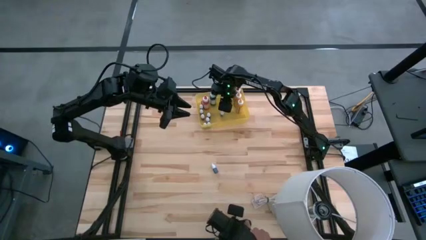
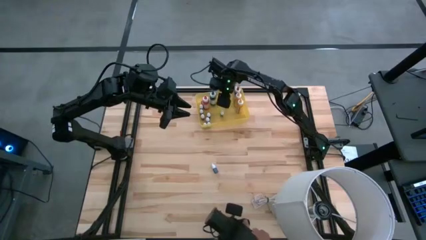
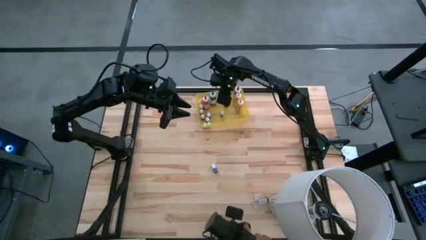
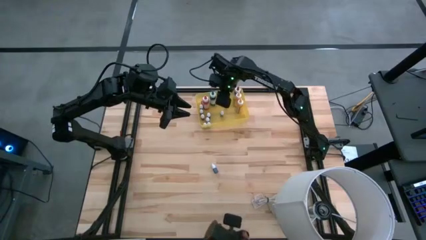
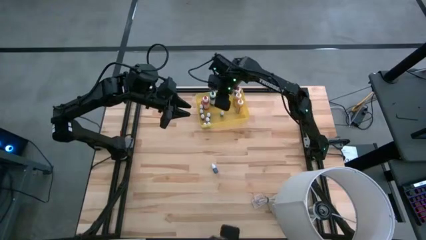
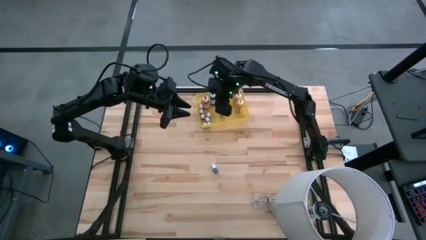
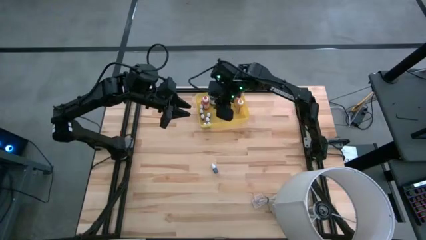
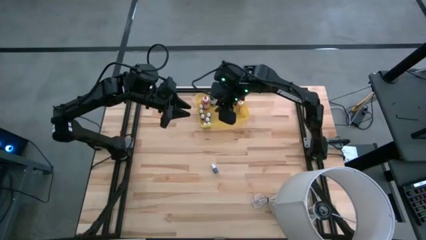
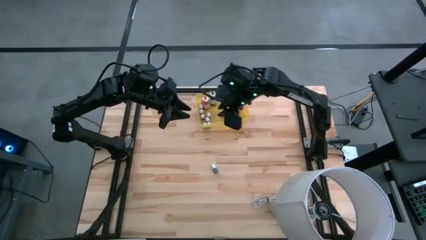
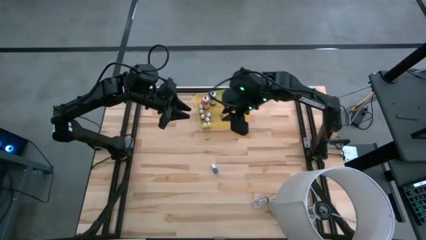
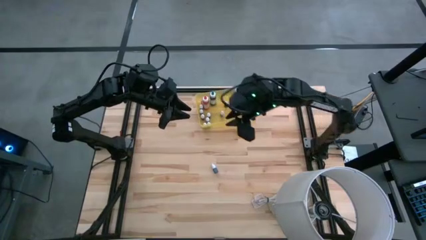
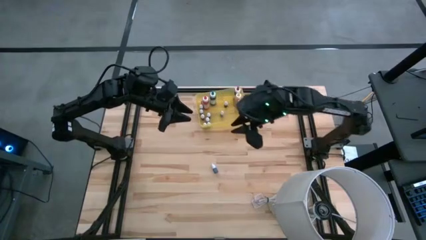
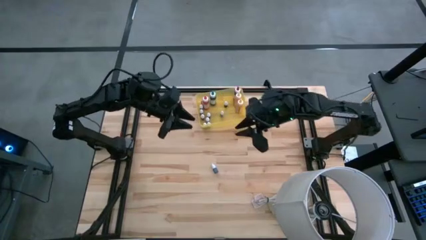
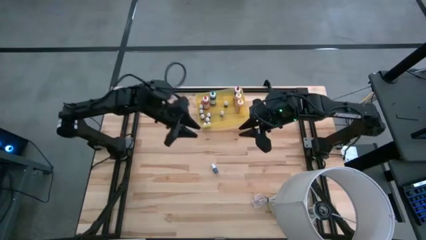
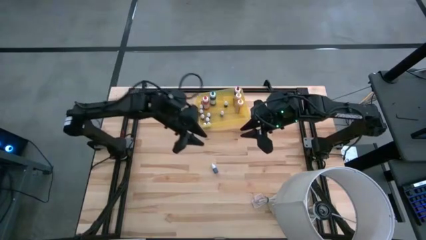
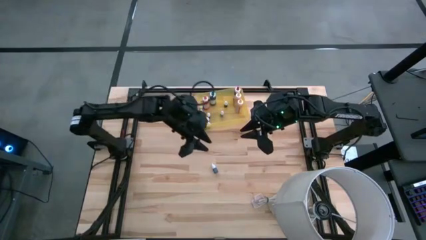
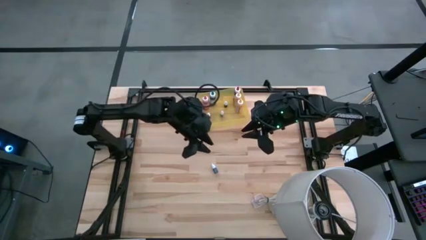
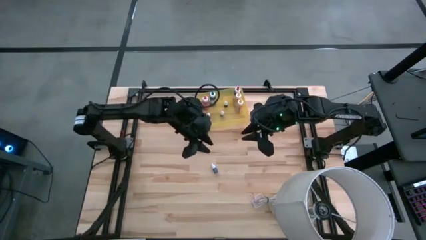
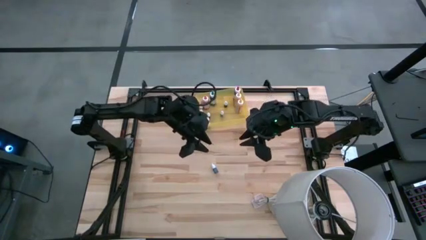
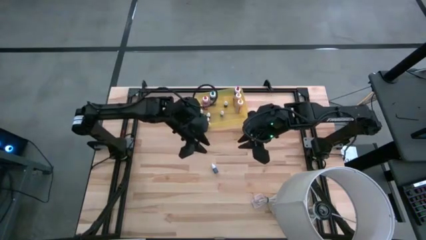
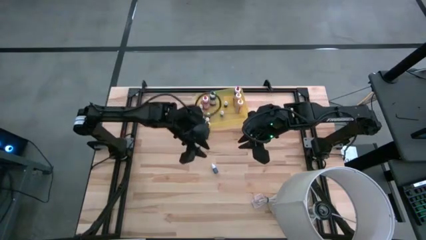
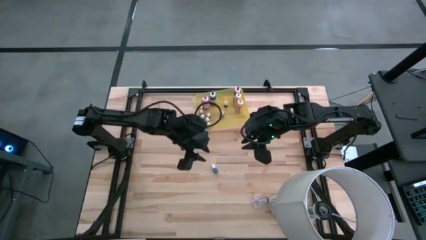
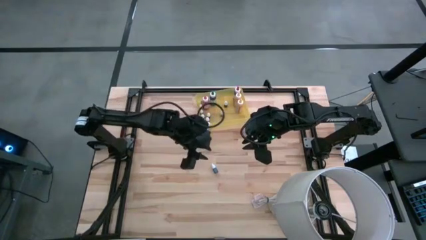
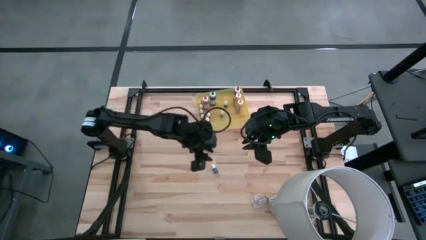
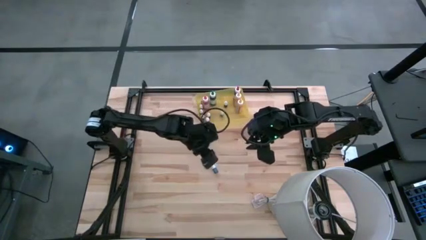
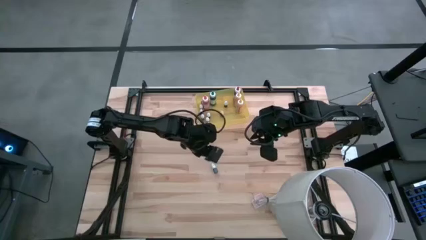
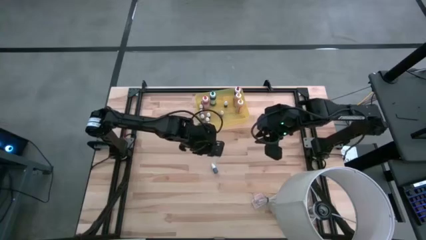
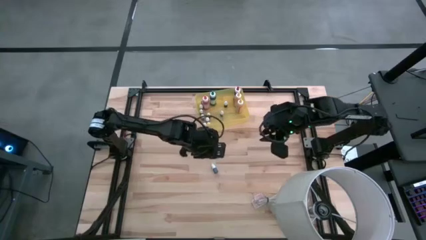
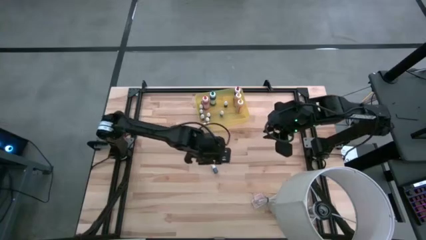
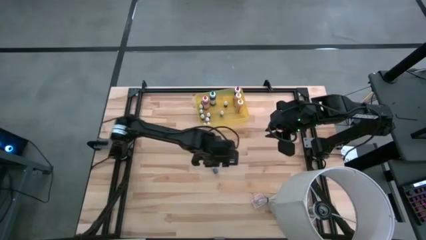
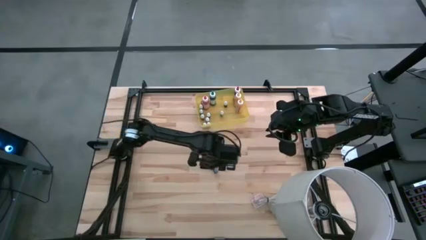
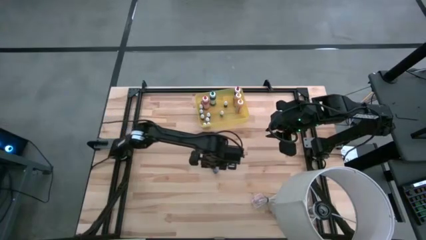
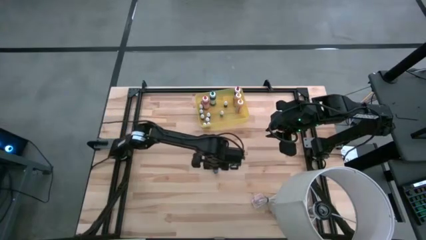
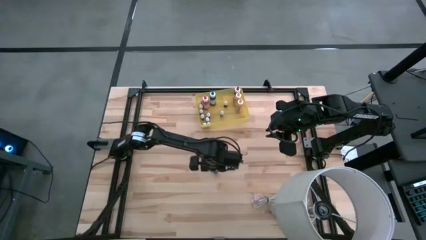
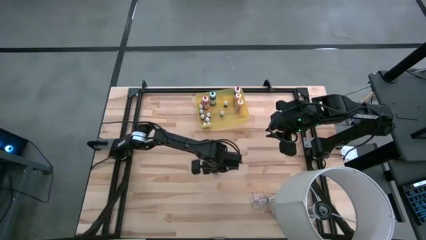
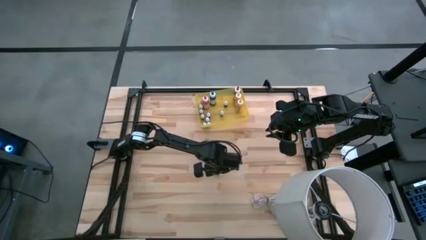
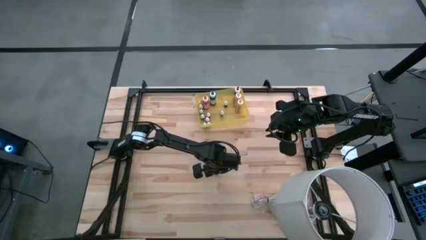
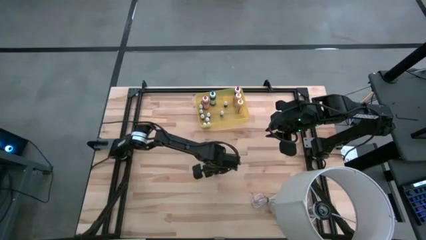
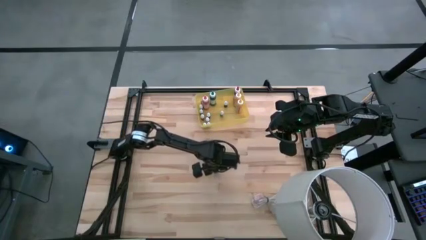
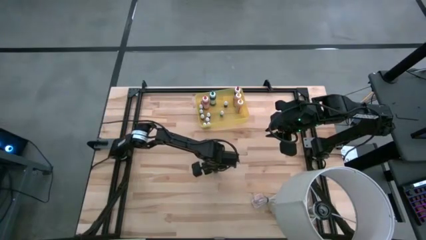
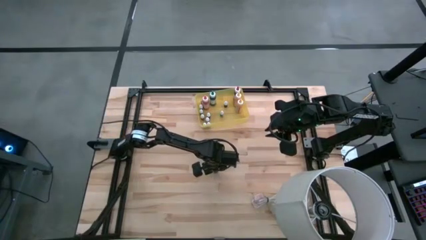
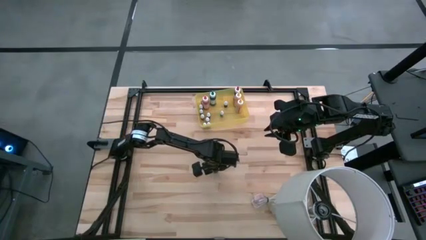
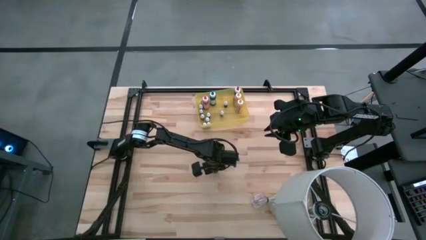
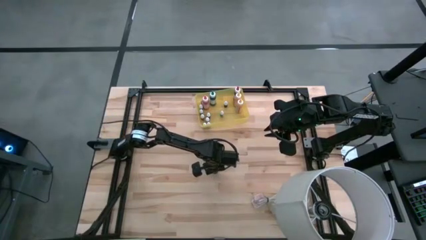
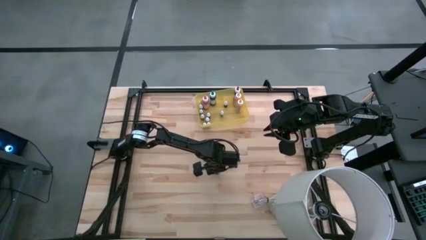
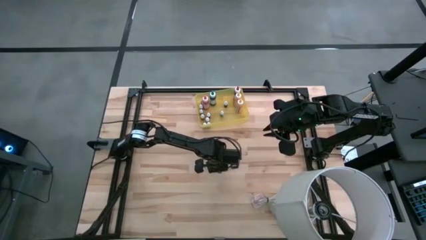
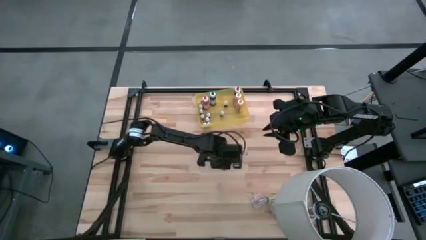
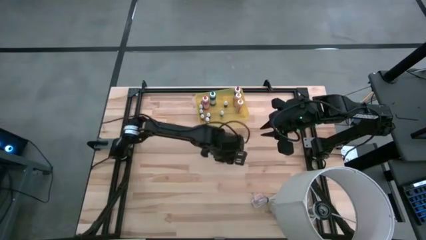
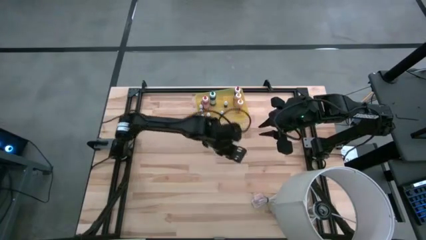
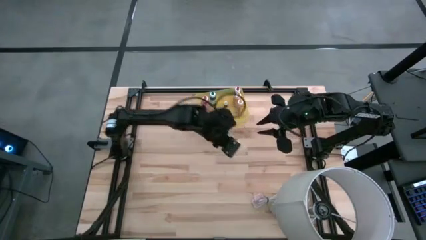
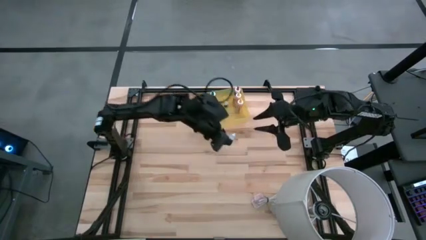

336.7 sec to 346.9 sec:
Task: Pick & Place food coloring
Put the small violet food coloring bottle into the yellow bin
